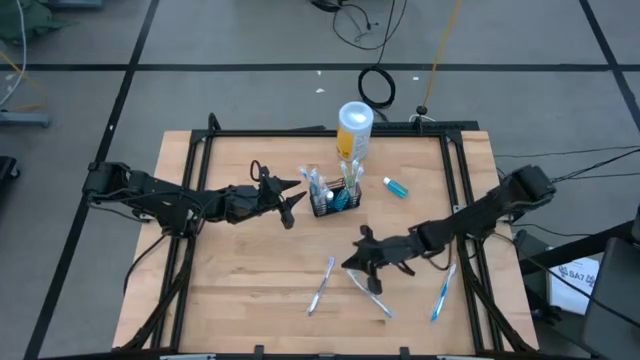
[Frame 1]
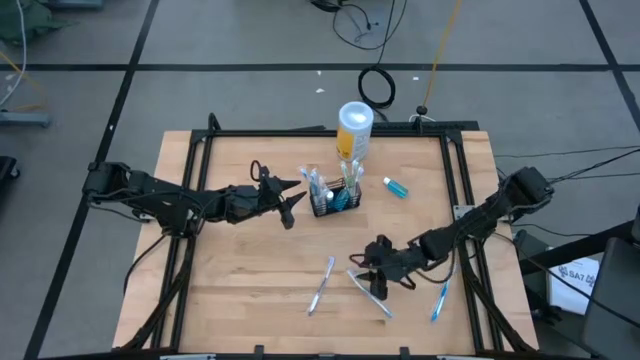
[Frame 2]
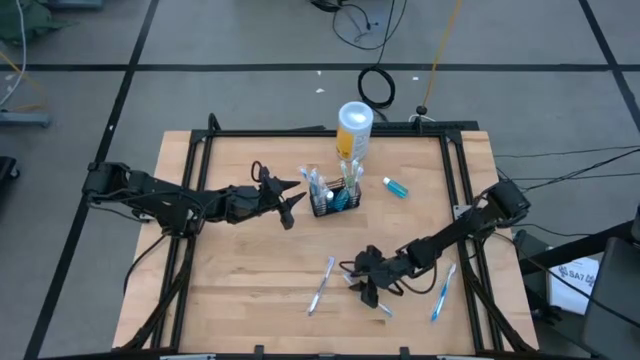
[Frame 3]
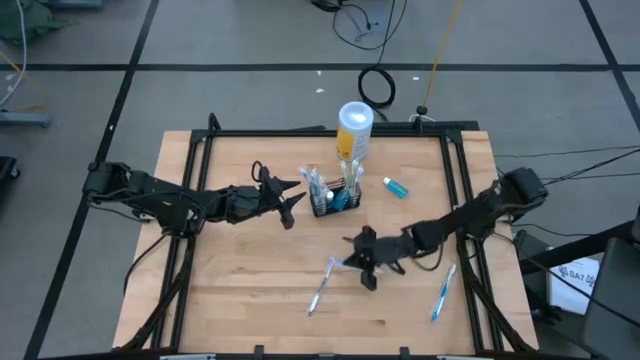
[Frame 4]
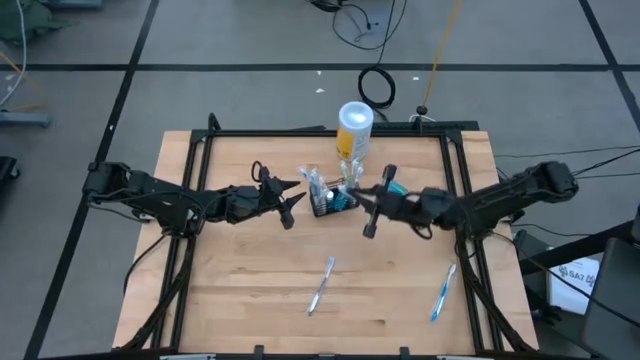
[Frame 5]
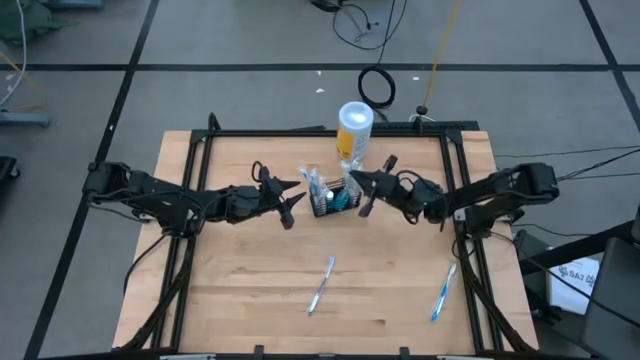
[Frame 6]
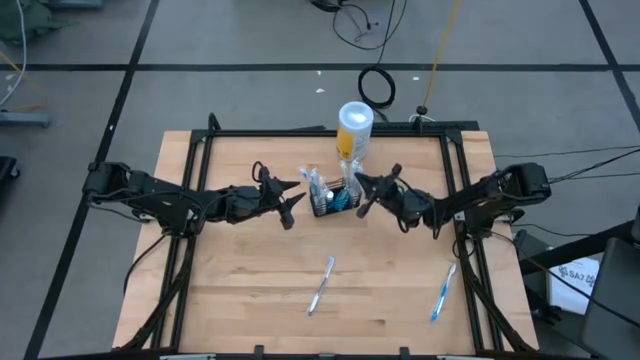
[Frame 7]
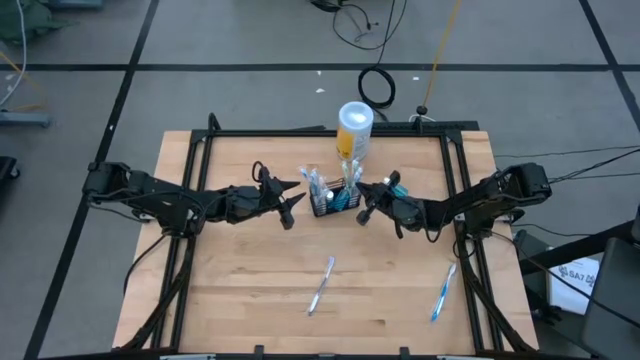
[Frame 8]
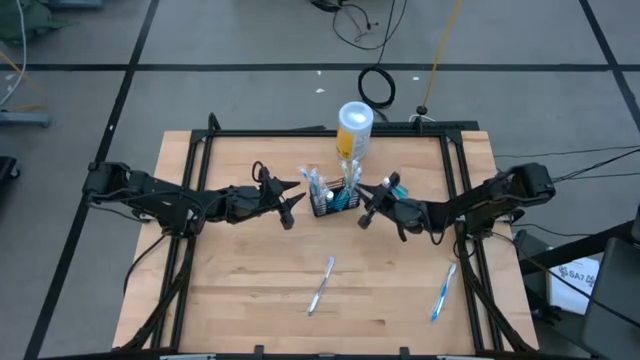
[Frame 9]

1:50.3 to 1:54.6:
Task: Pick & Place toothbrushing station
Put the blue toothbrush into the black wire organizer

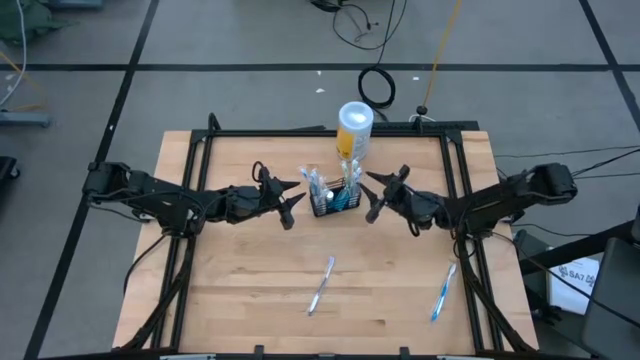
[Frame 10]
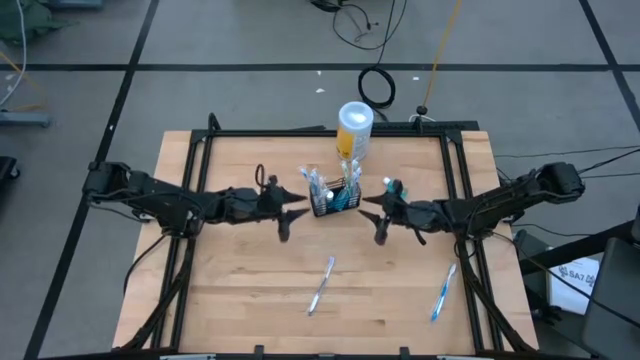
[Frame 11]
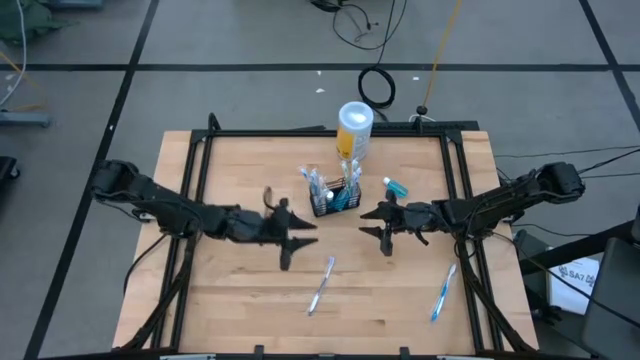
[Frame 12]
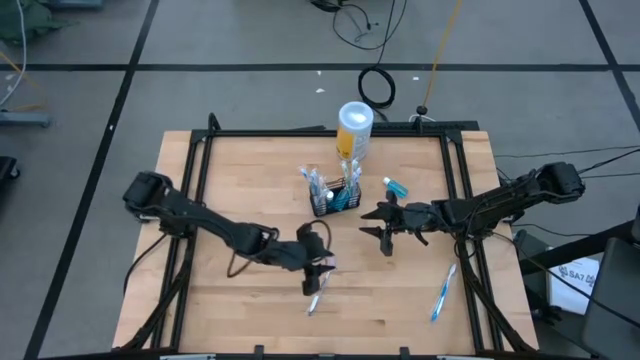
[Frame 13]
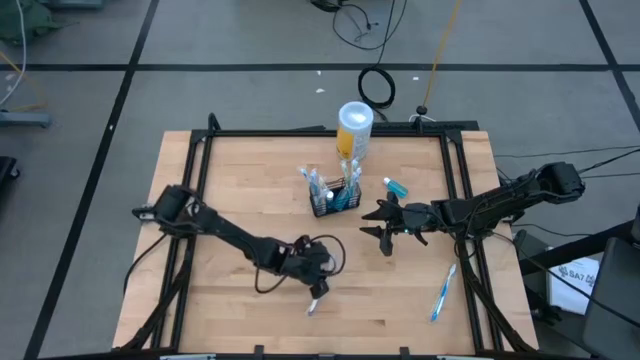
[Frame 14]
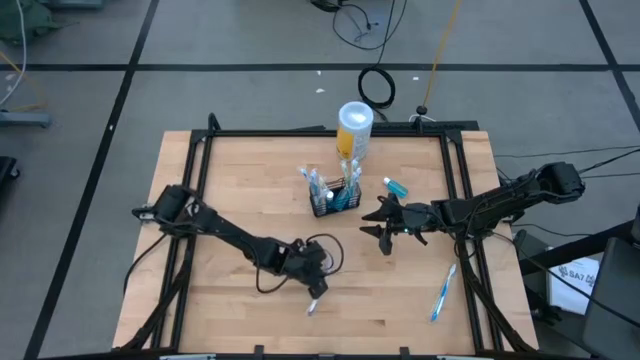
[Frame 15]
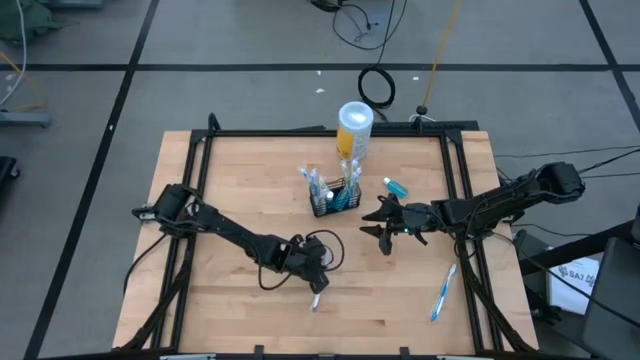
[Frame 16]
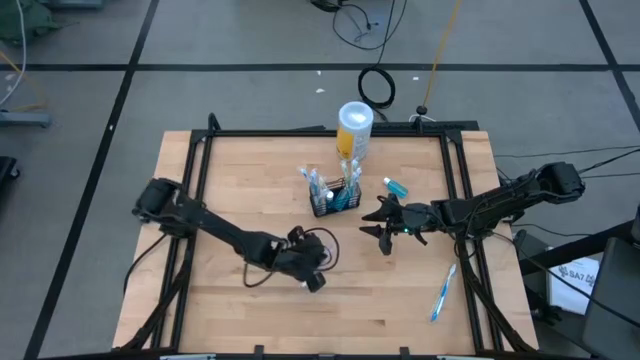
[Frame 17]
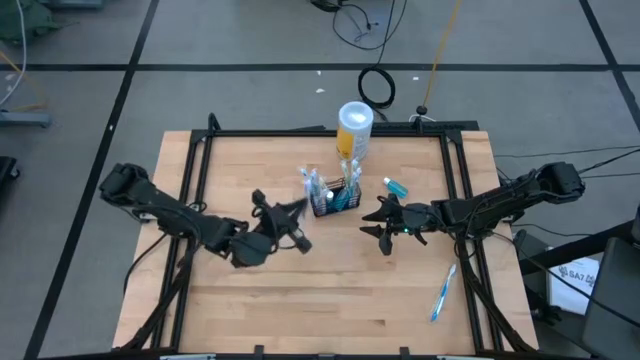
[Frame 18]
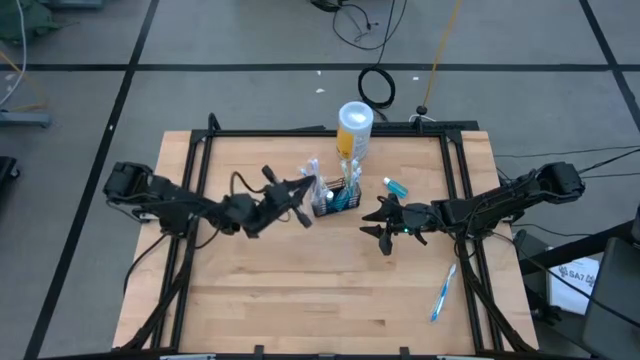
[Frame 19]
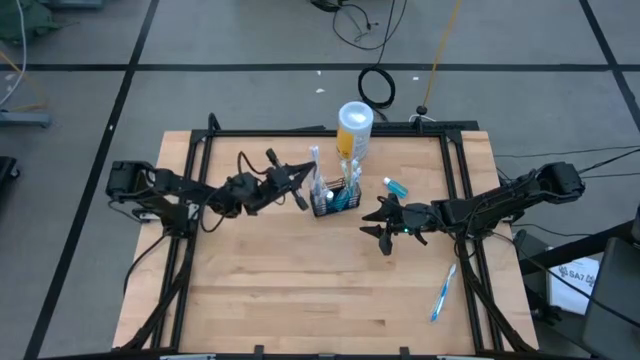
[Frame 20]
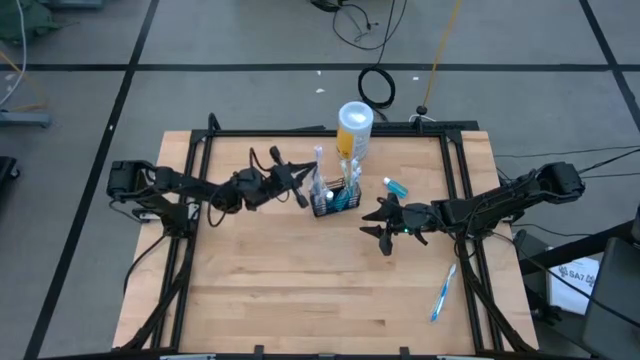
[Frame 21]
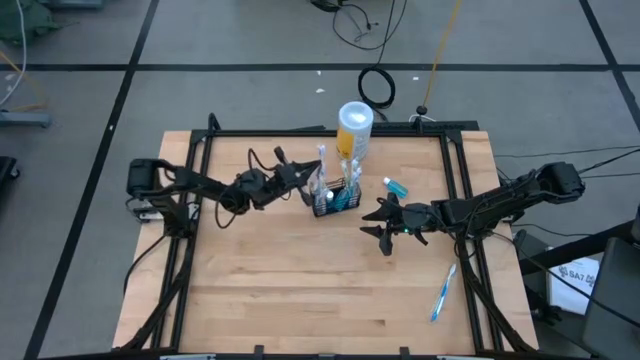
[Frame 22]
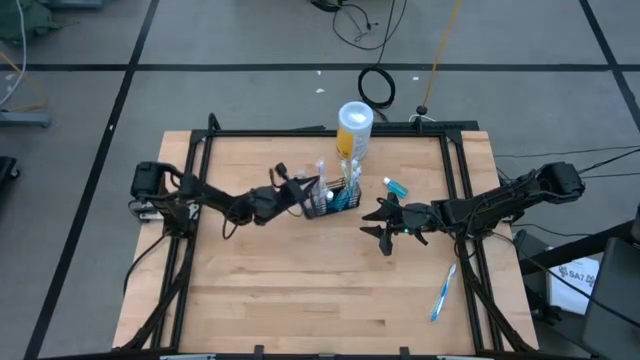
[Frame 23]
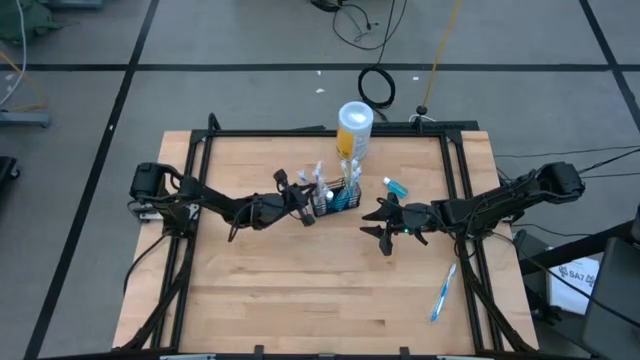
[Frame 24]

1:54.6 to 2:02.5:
Put the purple toothbrush into the black wire organizer

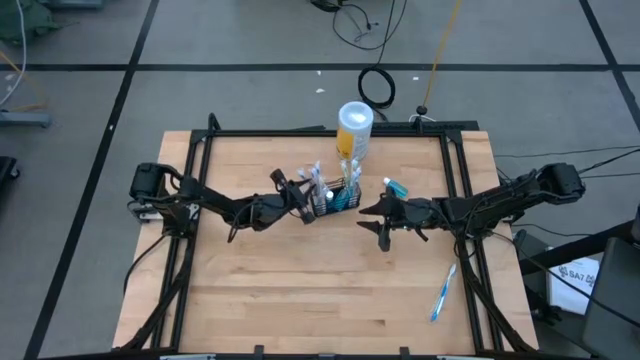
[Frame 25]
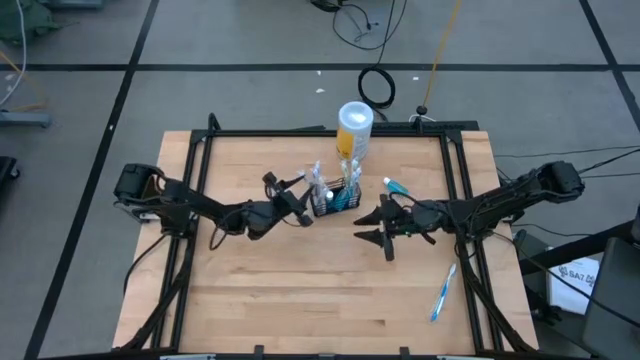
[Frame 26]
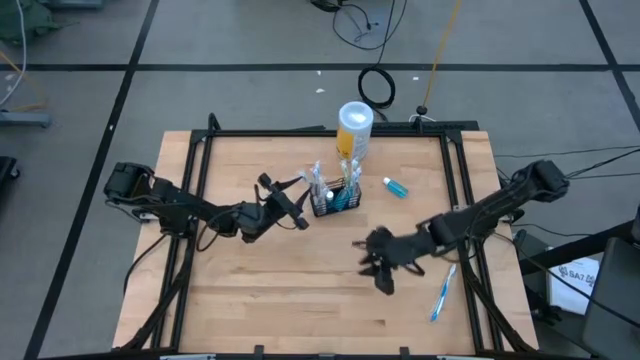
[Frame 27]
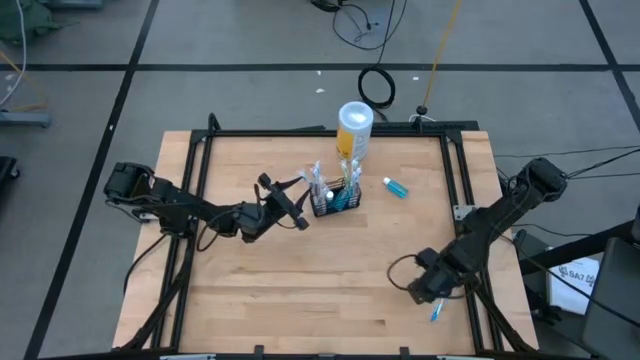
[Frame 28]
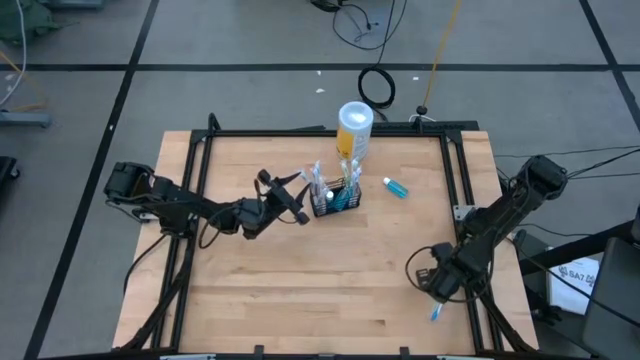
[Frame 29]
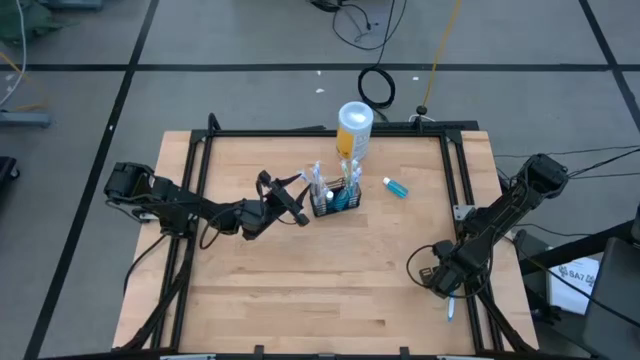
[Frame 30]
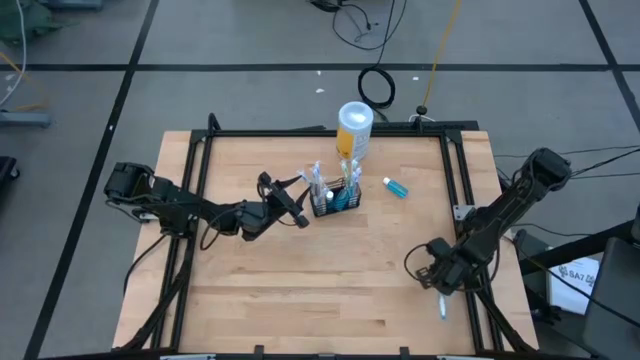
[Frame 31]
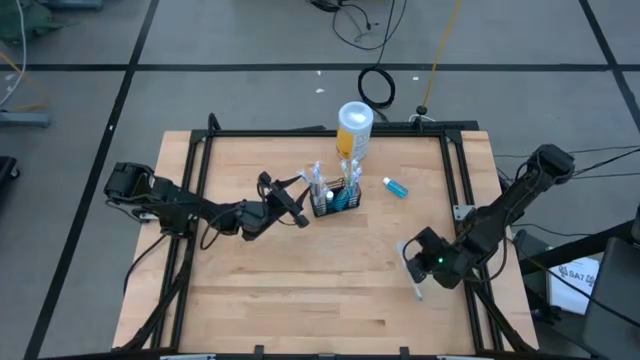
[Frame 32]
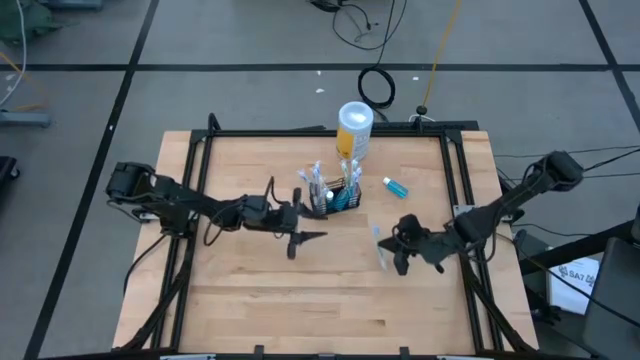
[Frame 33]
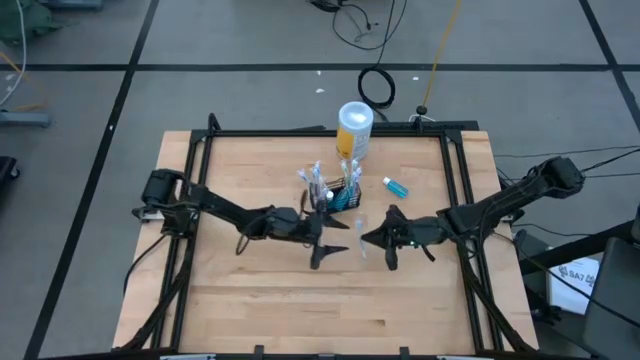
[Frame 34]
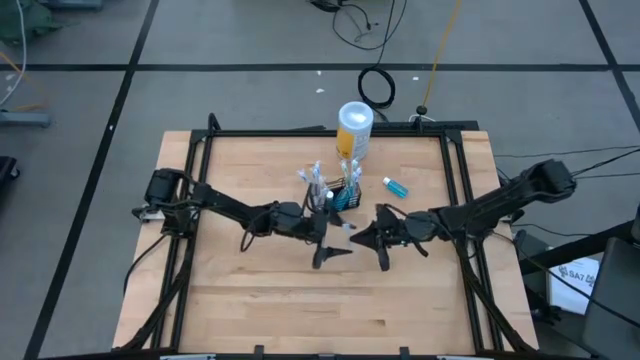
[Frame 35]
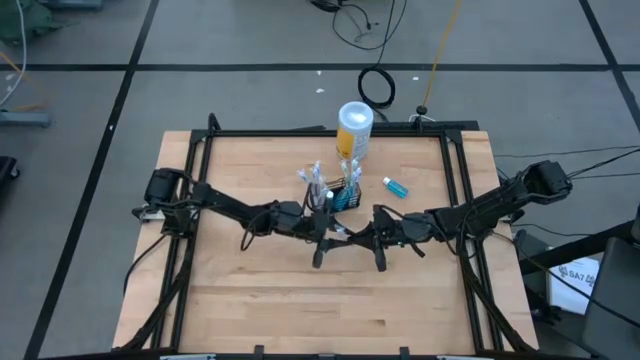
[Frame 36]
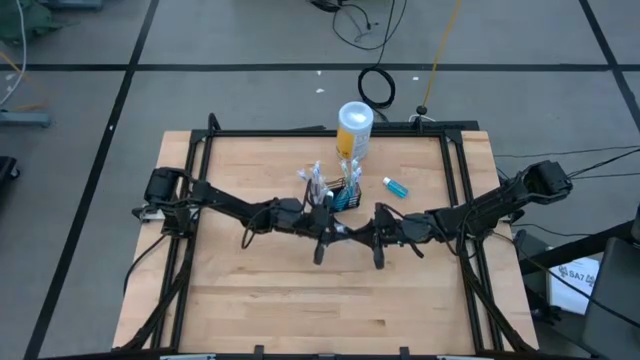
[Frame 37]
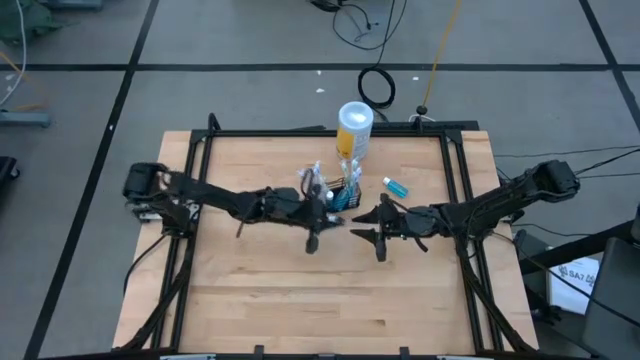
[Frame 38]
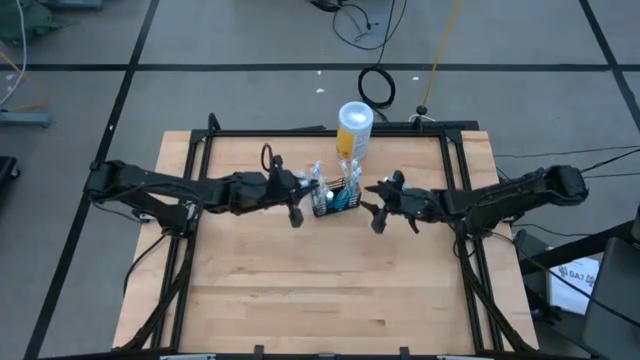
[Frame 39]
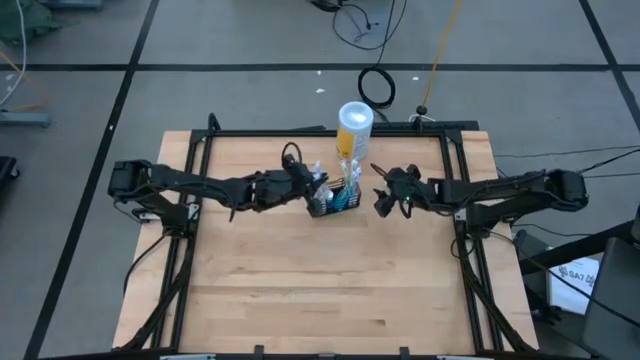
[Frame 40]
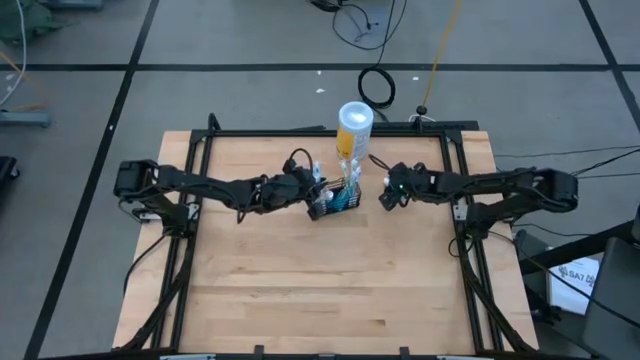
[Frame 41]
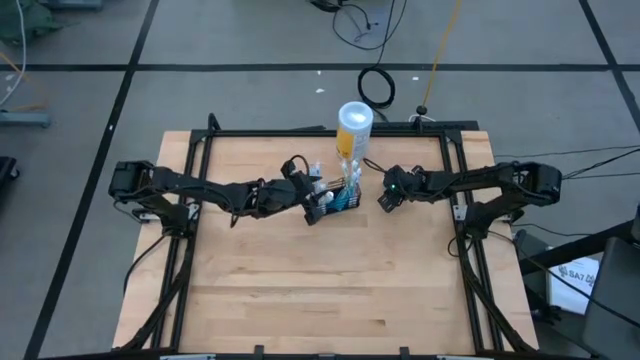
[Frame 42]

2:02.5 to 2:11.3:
Put the blue toothbrush into the black wire organizer

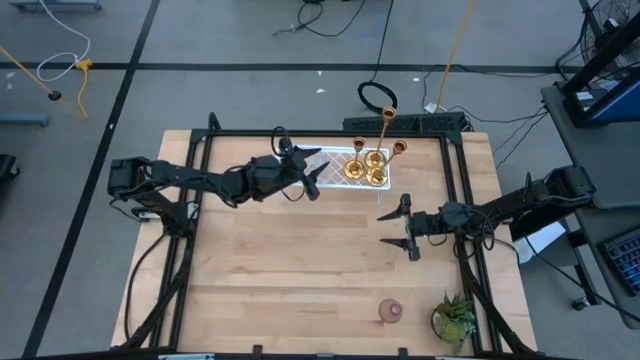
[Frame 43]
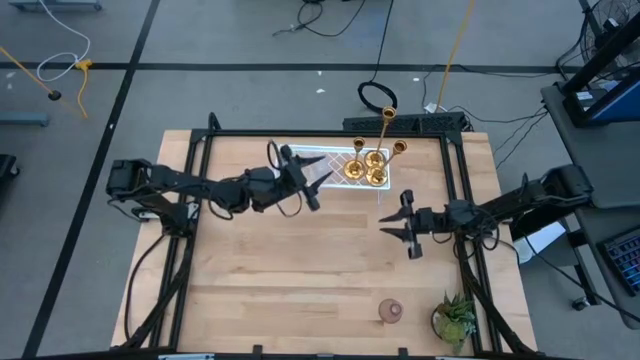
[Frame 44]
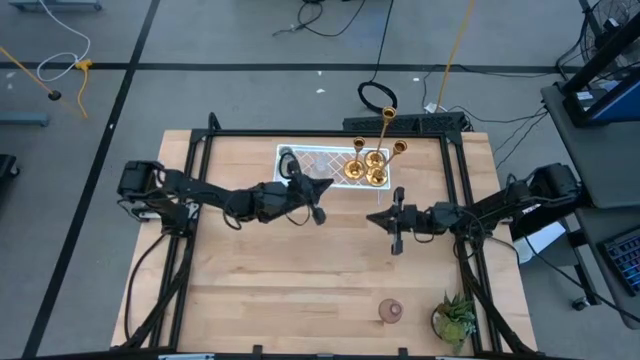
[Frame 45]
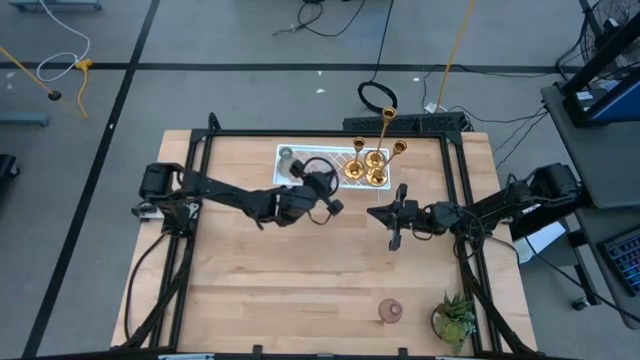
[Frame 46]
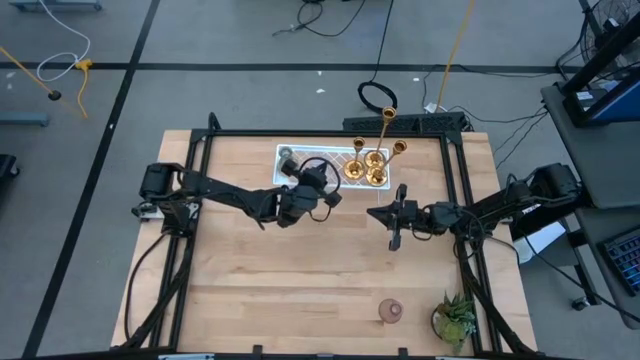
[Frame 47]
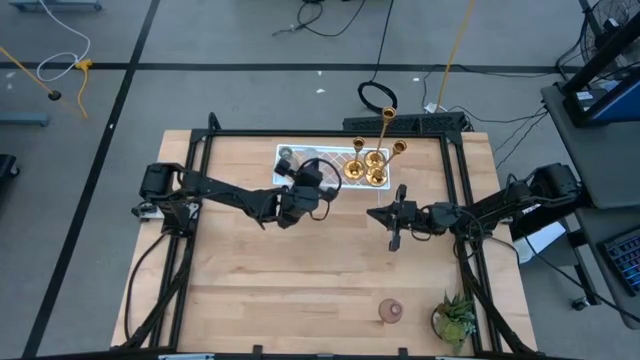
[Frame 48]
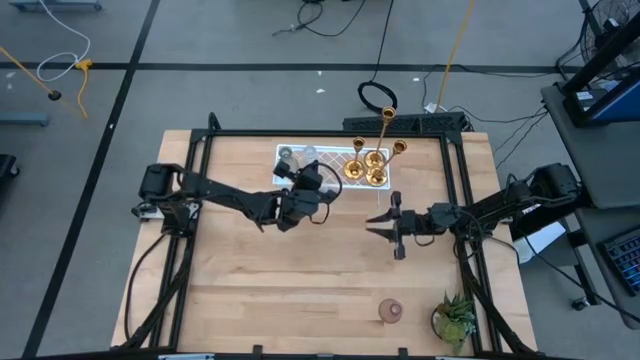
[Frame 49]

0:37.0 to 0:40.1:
Task: Pick & Place candle stick holders
Adjust the transparent candle holder
